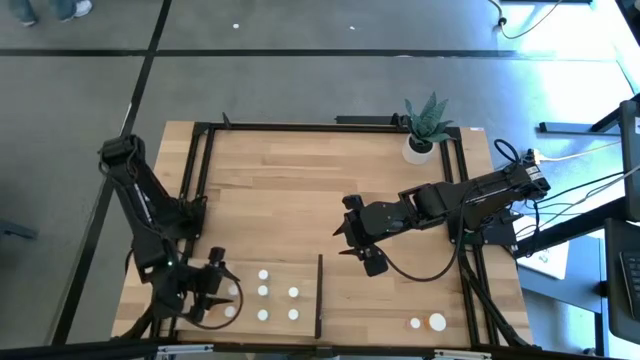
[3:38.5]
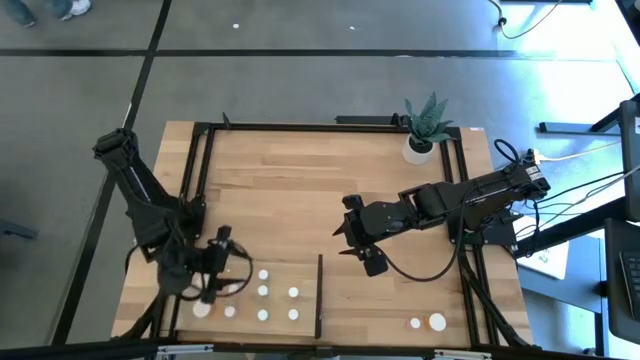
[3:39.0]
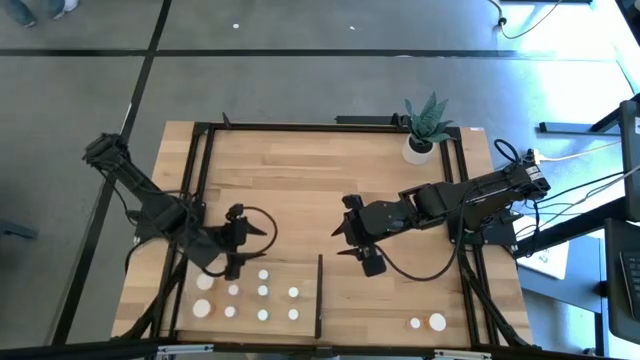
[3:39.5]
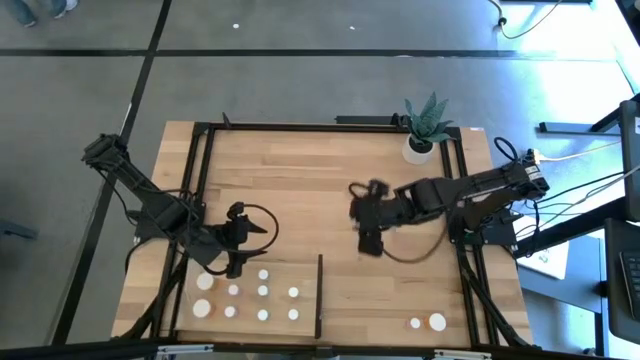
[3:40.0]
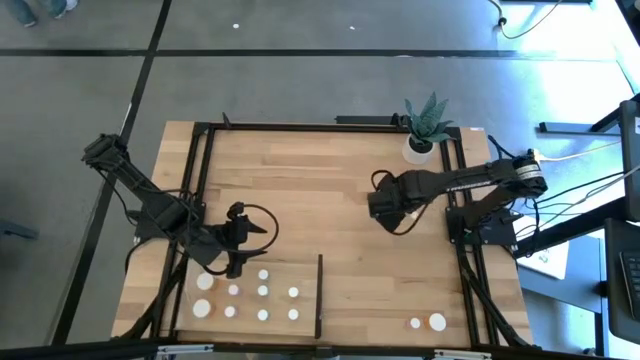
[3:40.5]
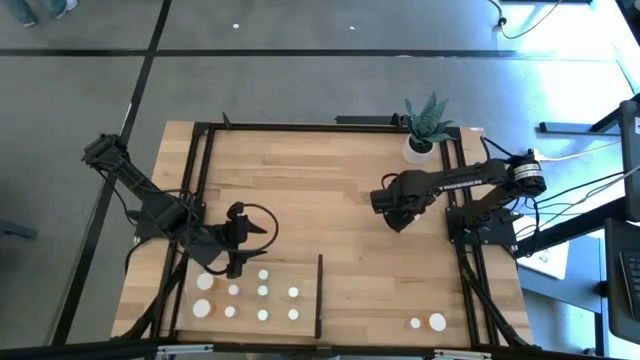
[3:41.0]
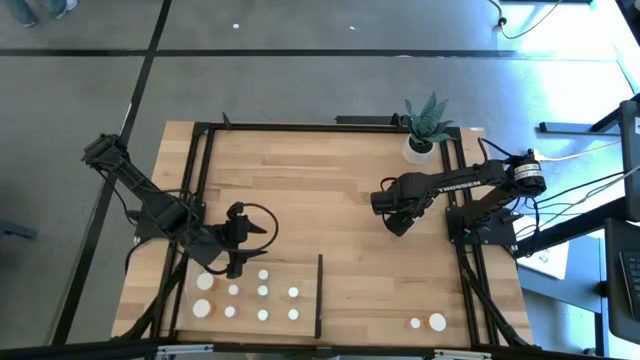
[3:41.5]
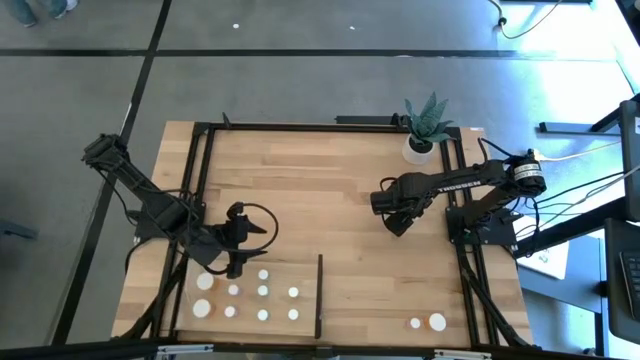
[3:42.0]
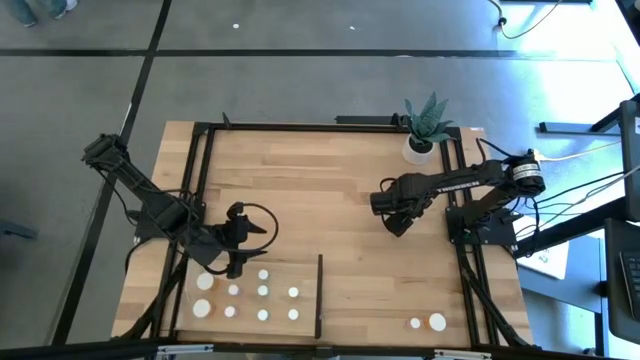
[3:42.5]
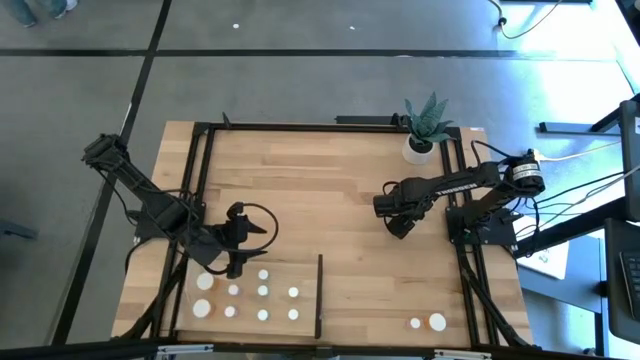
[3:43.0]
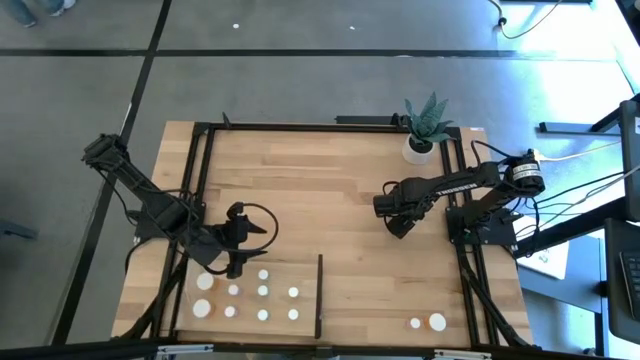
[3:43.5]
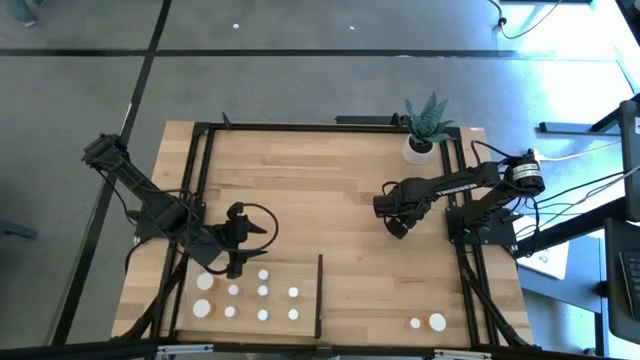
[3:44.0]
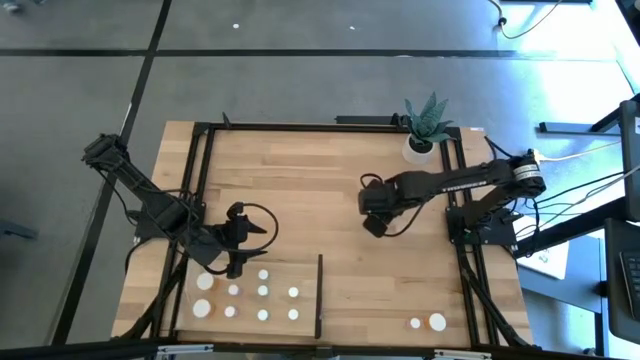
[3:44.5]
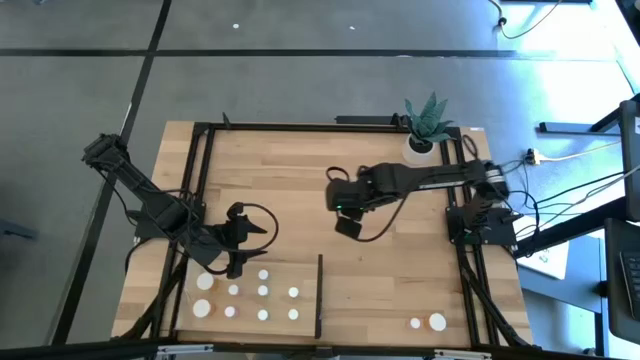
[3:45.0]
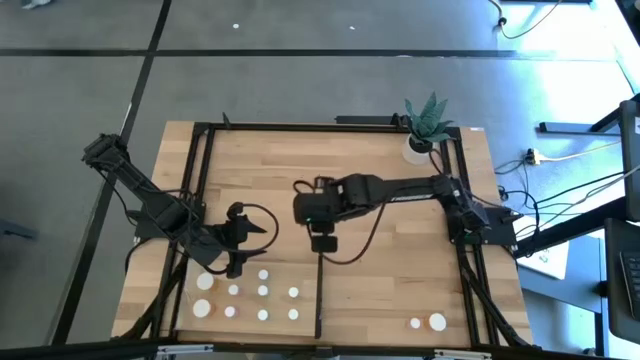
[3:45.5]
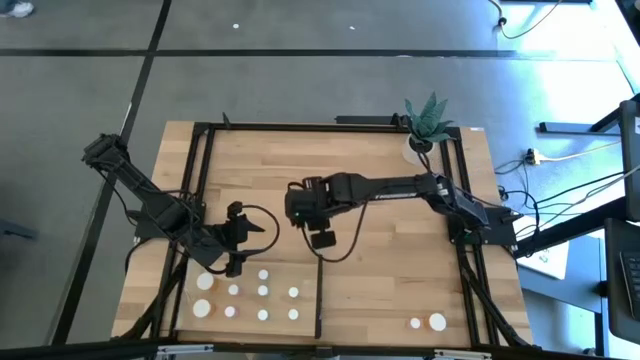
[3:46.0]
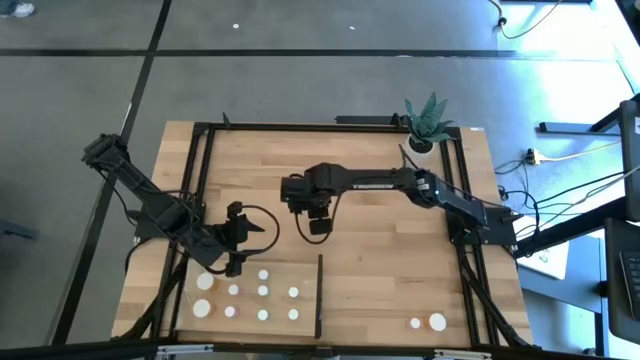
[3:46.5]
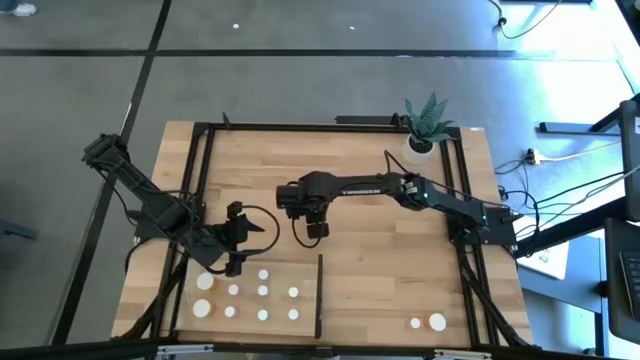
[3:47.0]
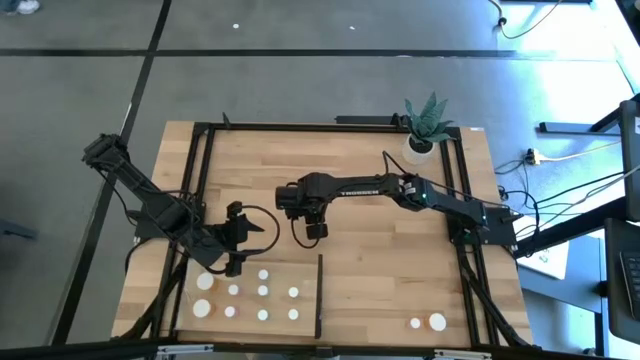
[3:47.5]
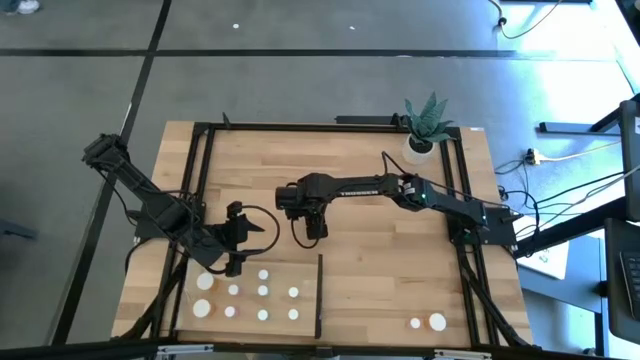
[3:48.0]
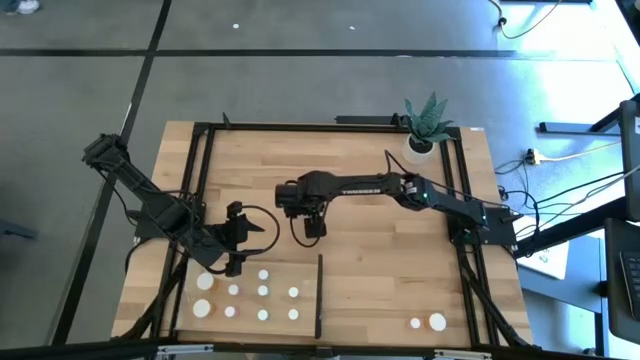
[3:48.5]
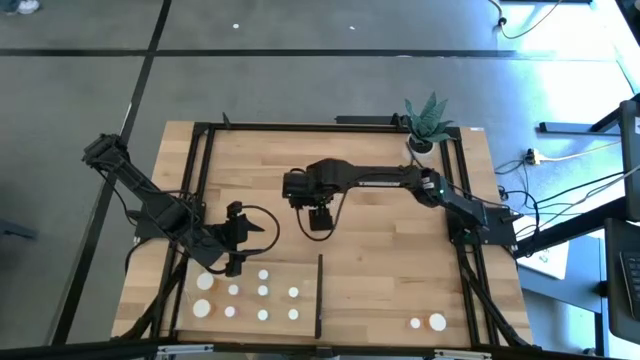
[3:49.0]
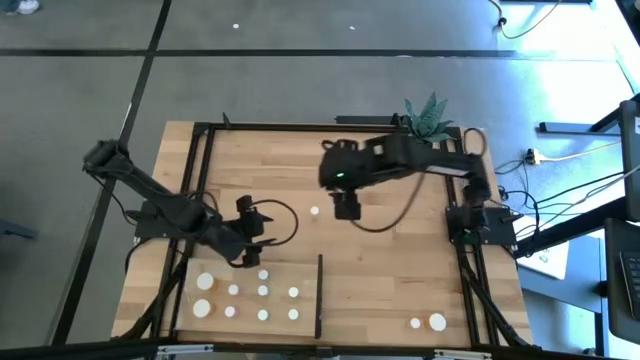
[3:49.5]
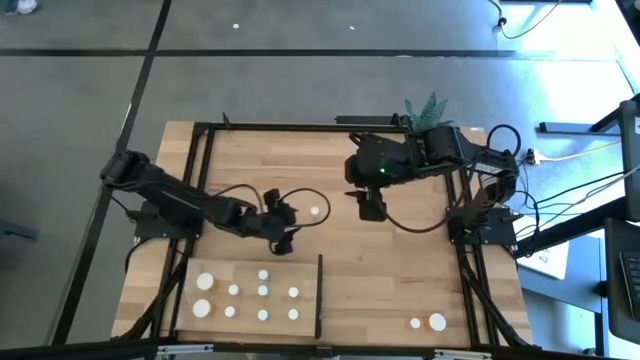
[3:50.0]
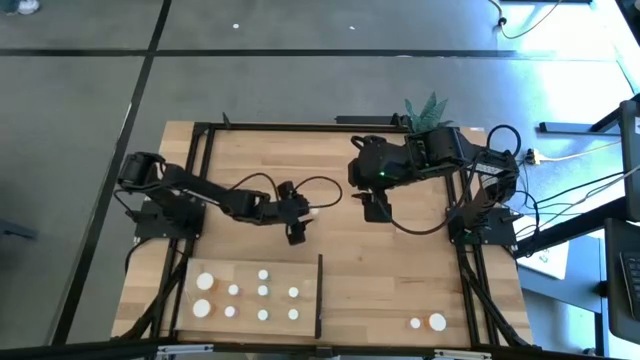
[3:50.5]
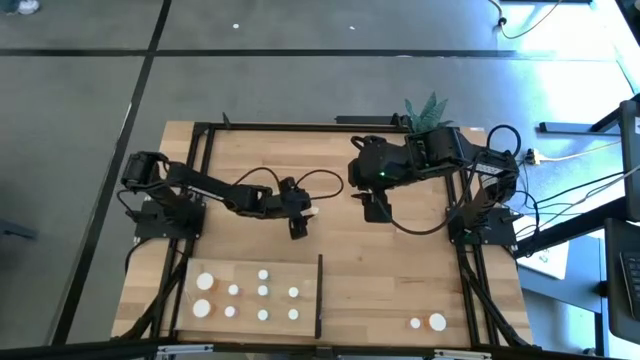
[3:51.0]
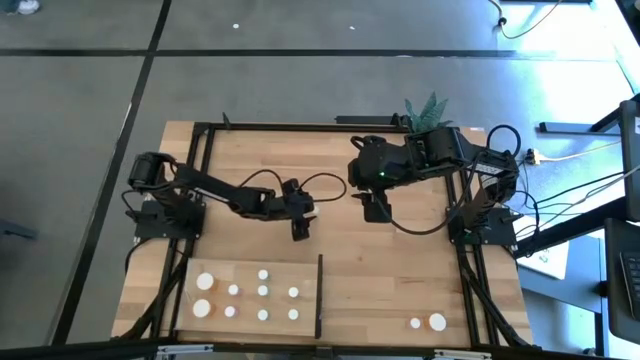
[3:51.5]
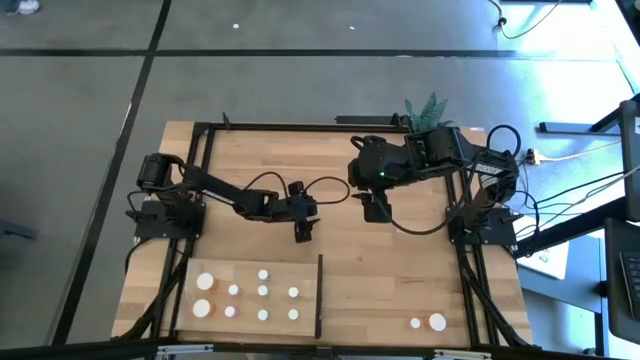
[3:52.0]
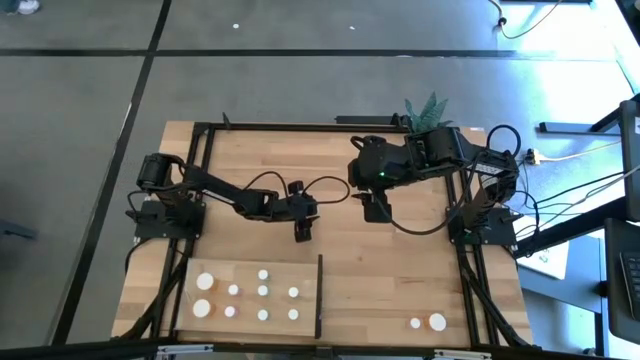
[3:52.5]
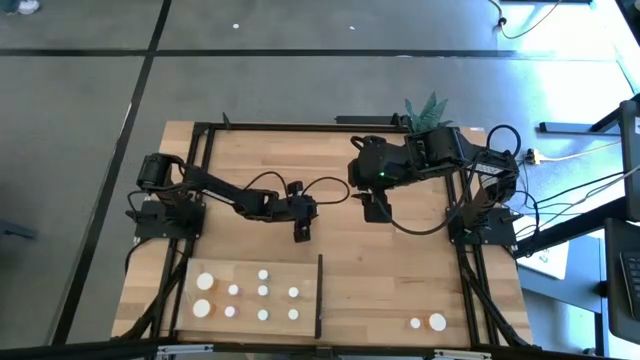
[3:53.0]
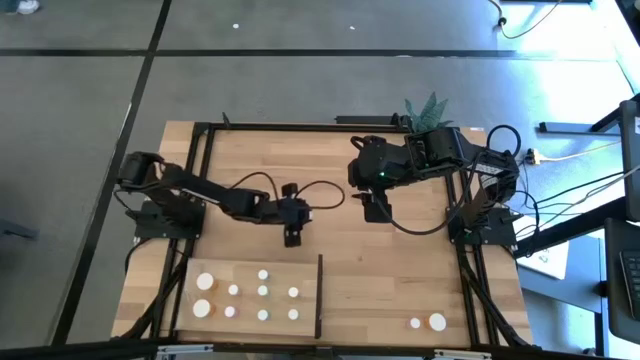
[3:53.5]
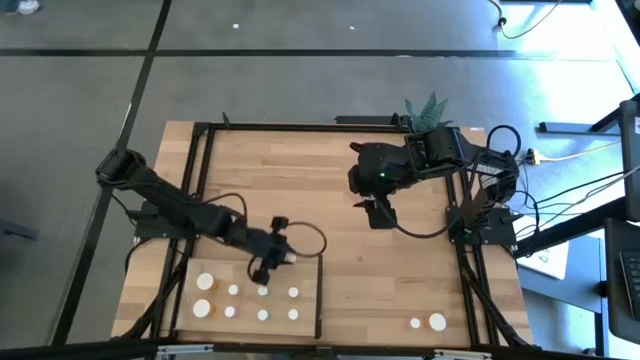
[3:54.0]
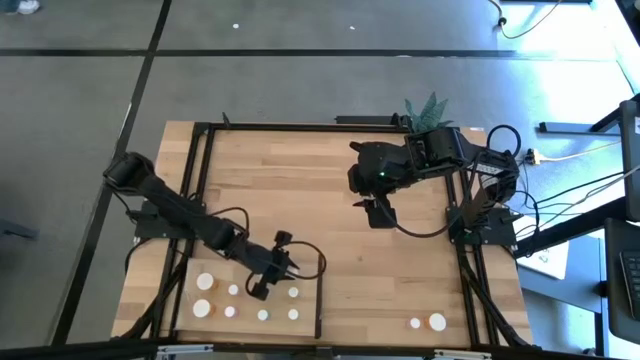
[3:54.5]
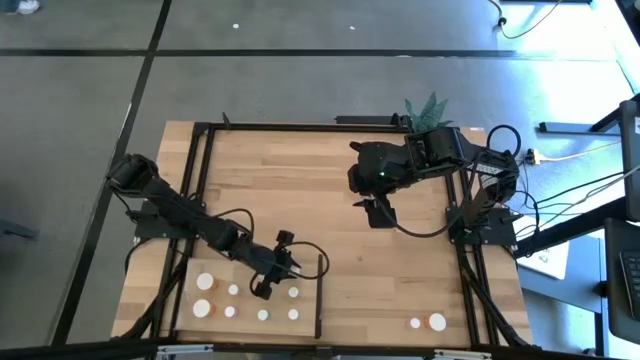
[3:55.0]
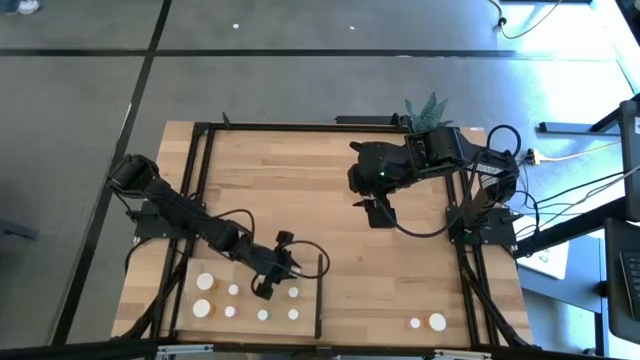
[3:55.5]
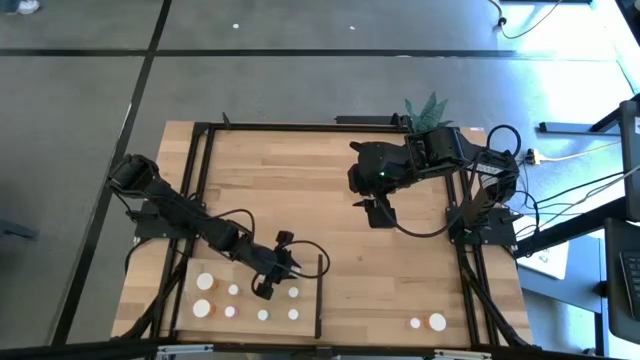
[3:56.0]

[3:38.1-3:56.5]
Task: Pick and place medicine bottles onto shelf by color
Put the yellow pill bottle on the shelf aligned with the other yellow pill bottle

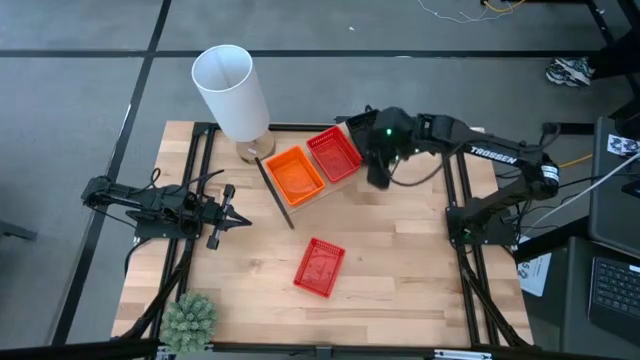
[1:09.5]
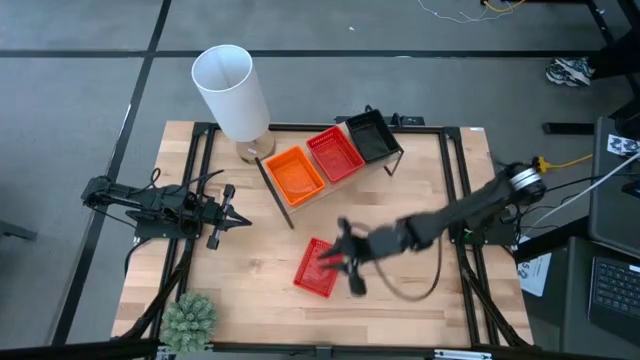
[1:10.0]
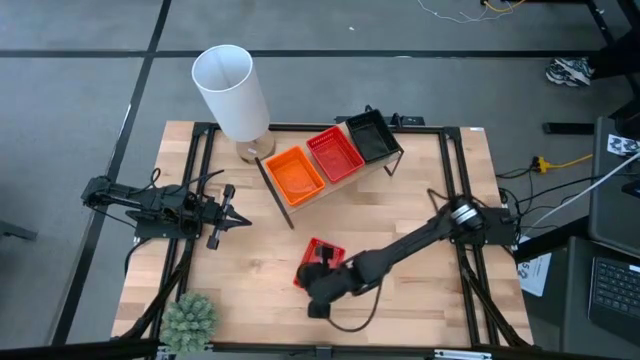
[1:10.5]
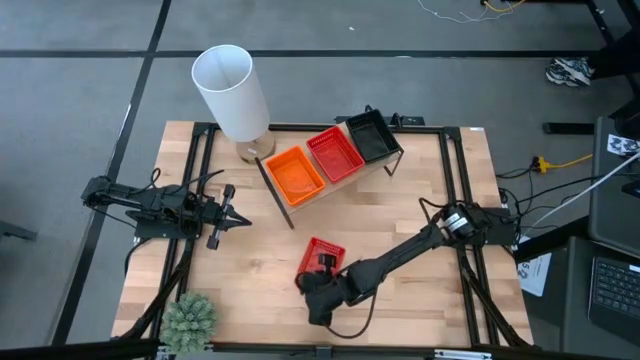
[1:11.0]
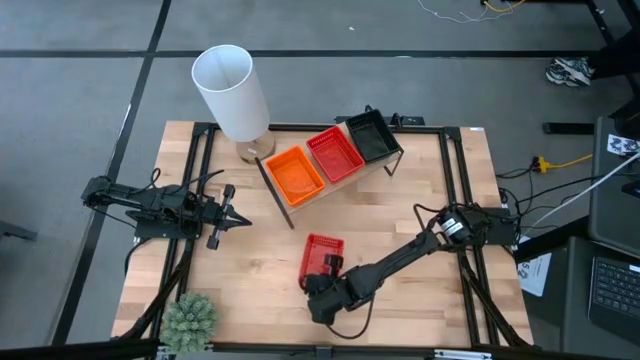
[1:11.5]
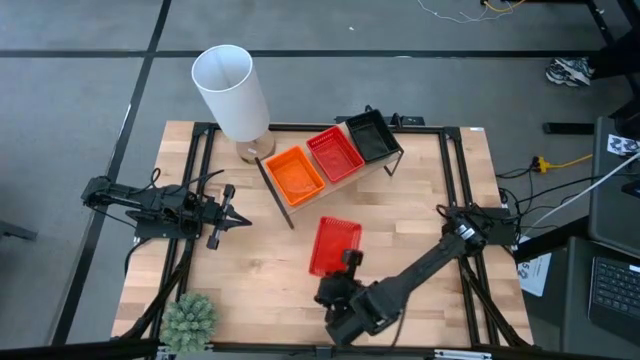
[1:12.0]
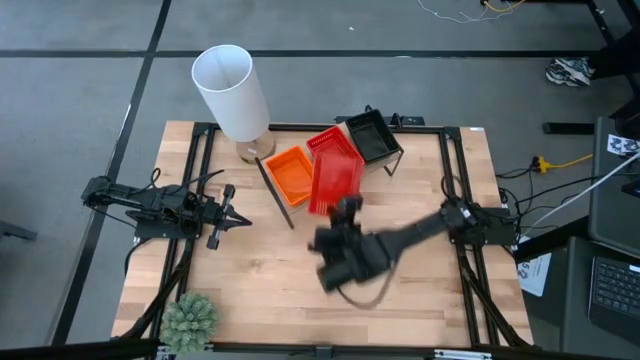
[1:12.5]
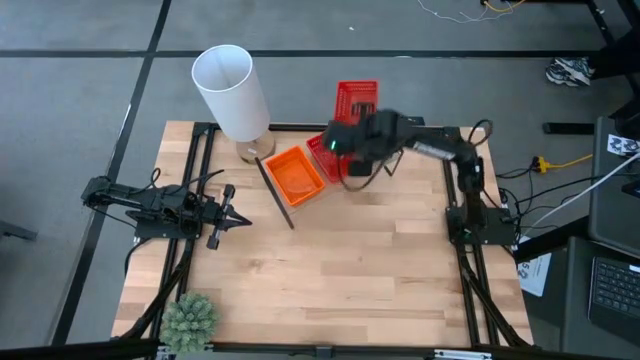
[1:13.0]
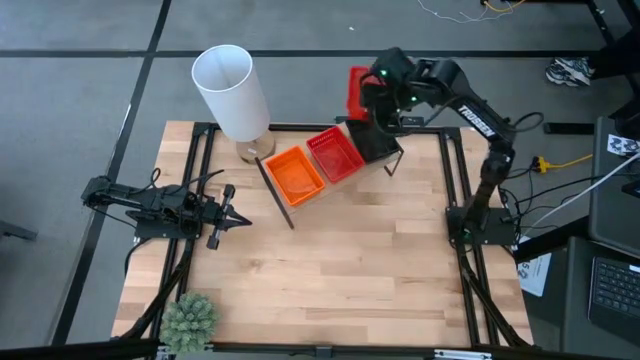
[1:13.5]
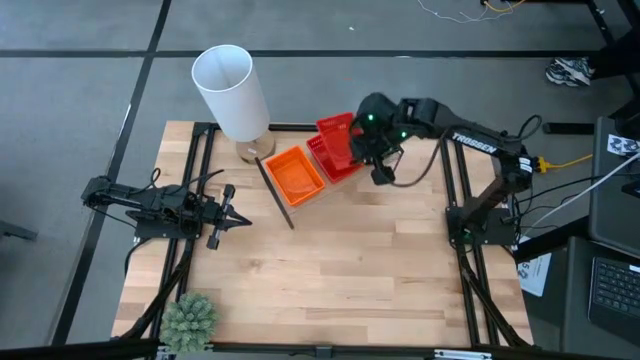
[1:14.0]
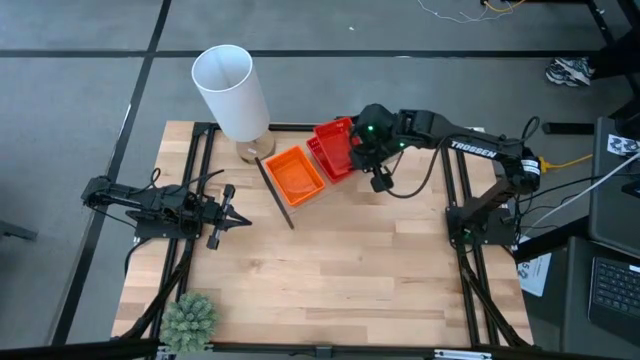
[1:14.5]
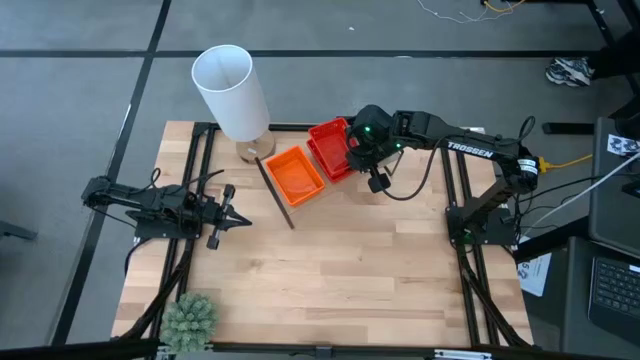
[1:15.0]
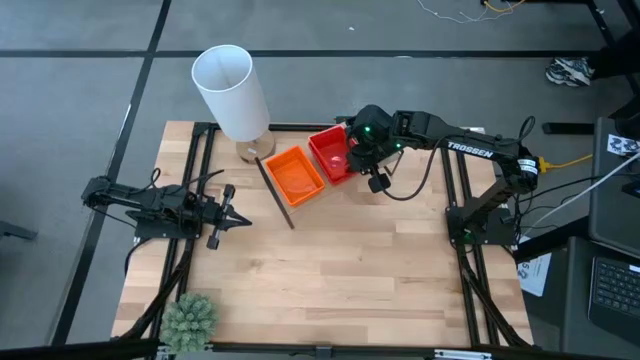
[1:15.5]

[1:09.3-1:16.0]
Task: Stack baskets on shelf by color
Stack the red basket on top of the other stacked red baskets on the shelf
